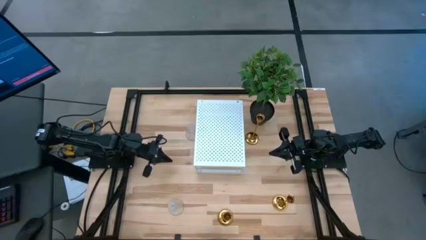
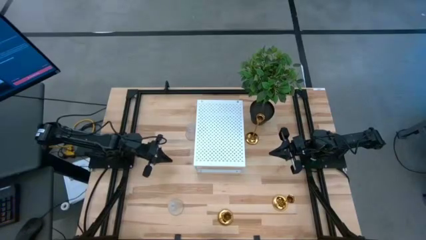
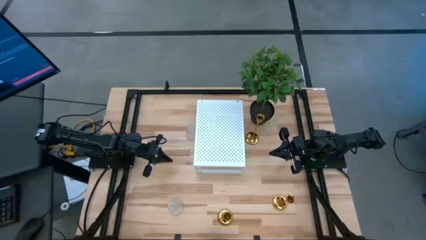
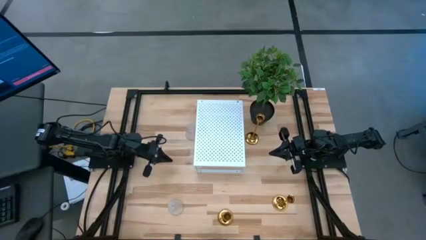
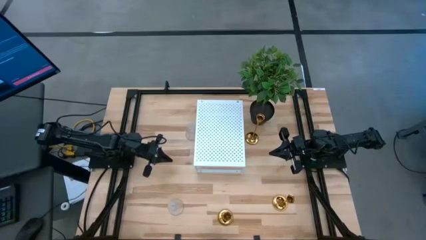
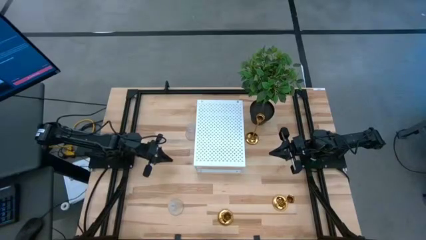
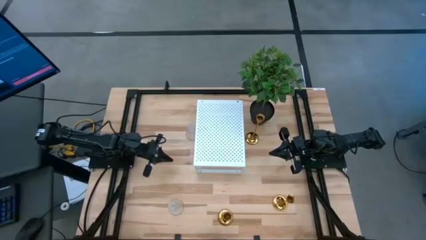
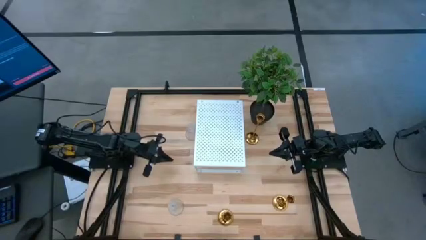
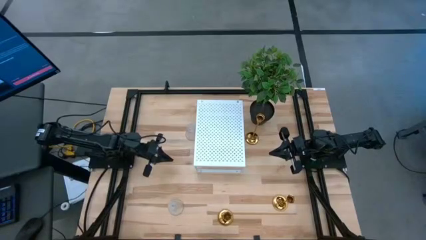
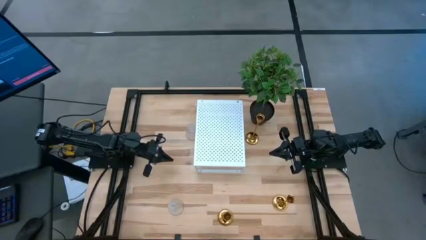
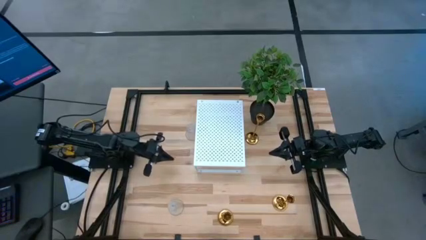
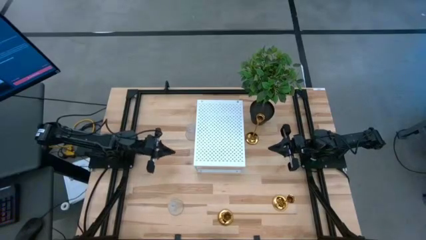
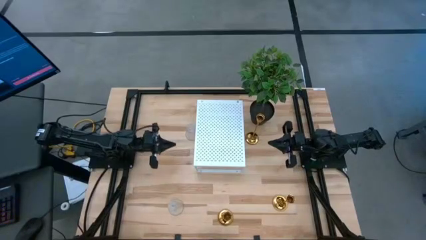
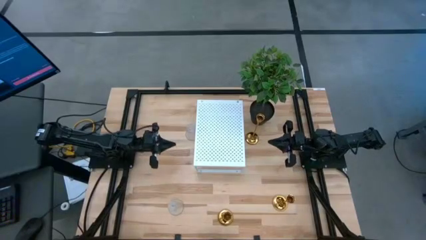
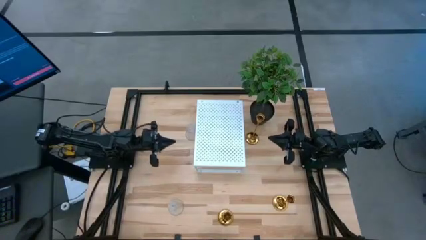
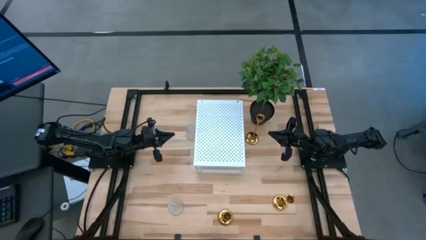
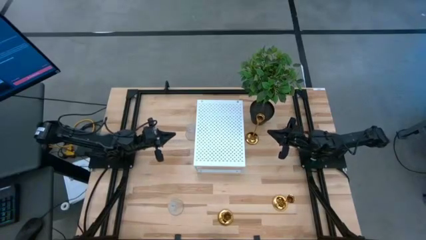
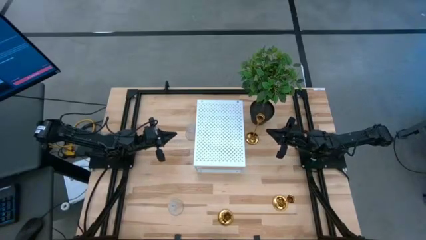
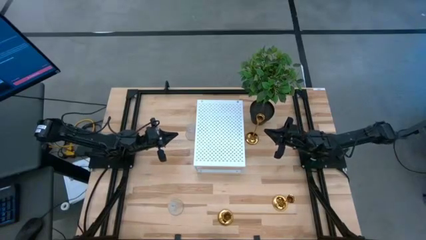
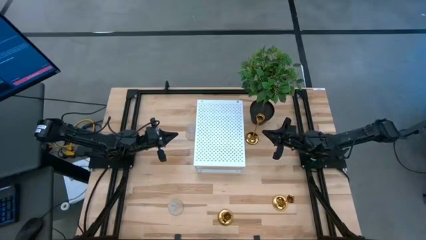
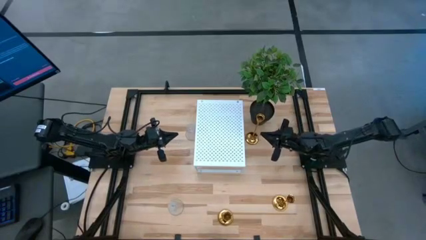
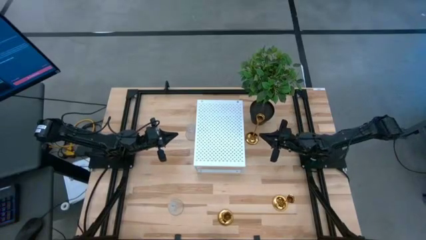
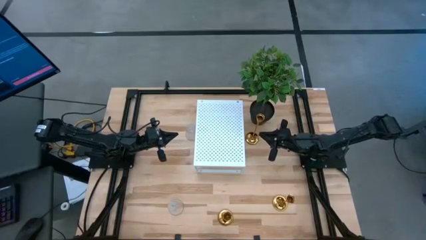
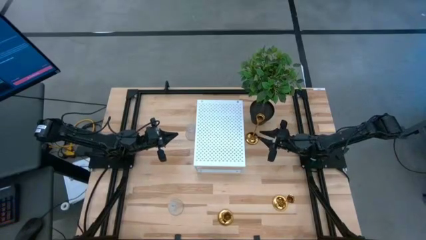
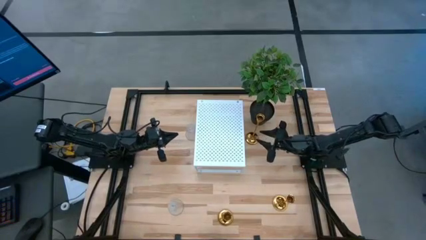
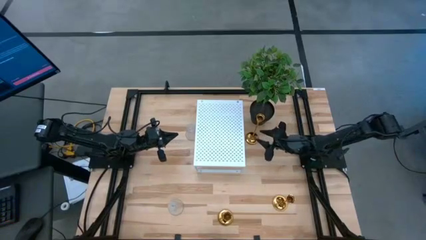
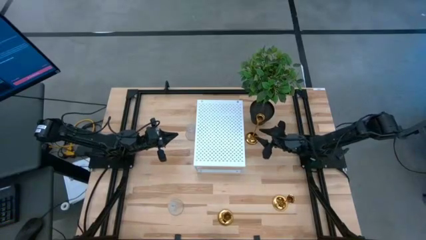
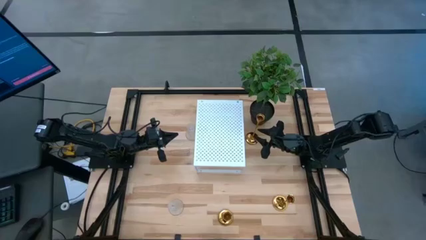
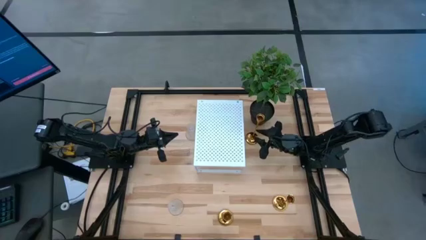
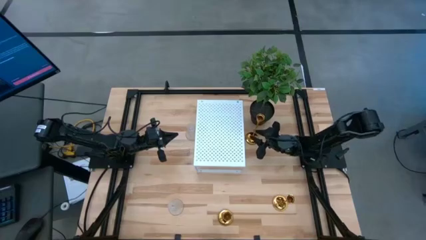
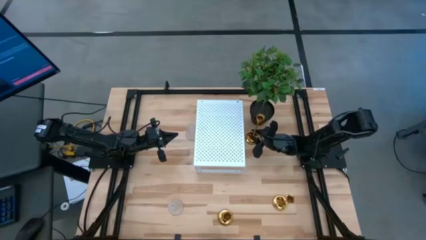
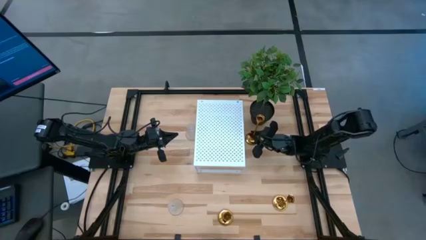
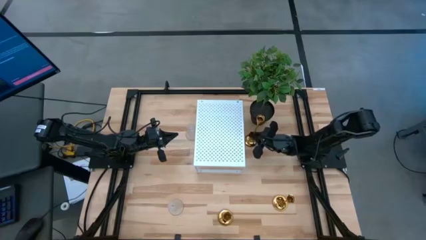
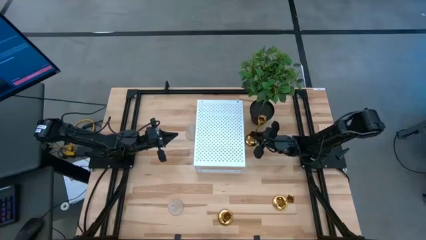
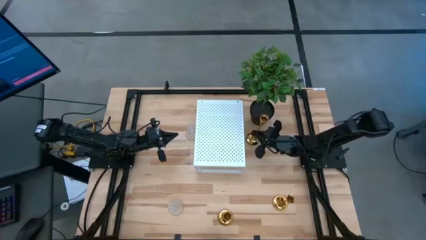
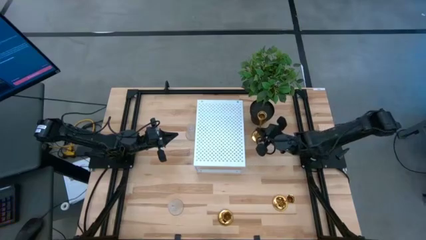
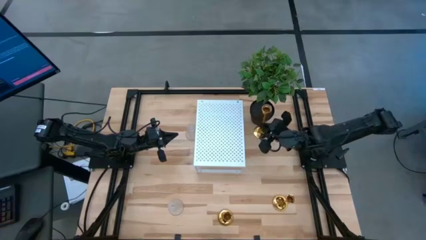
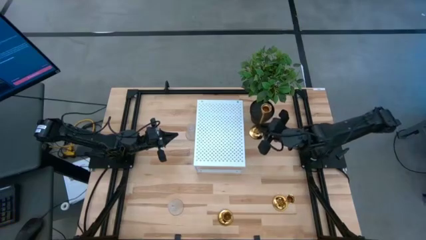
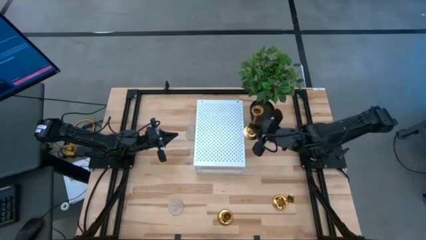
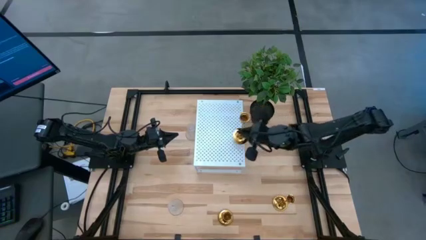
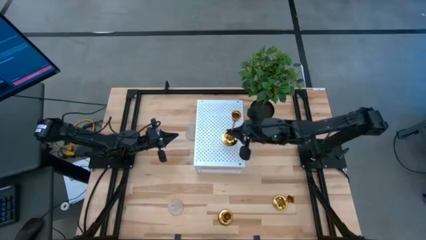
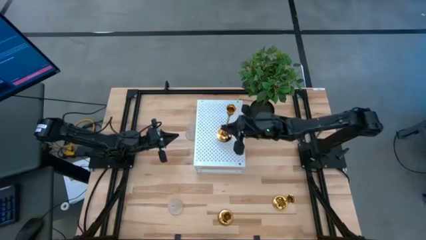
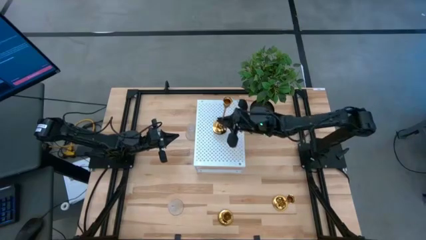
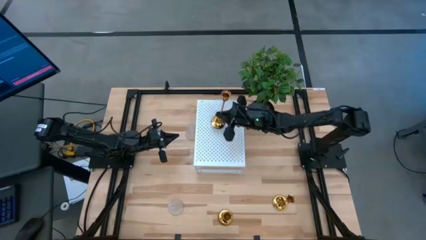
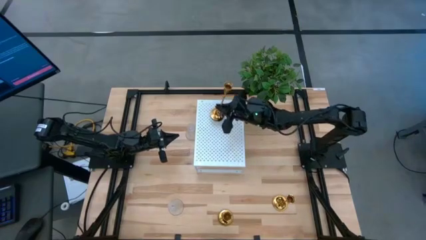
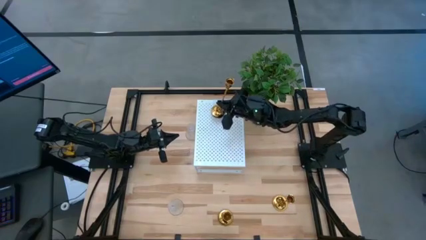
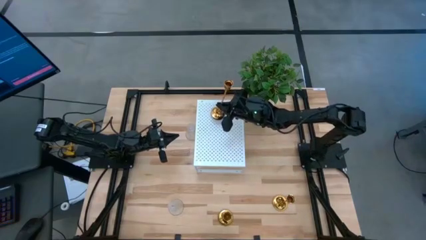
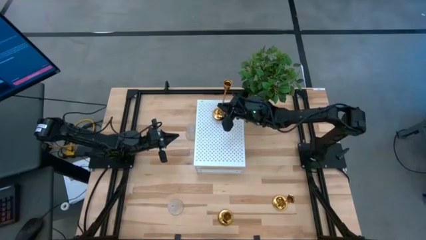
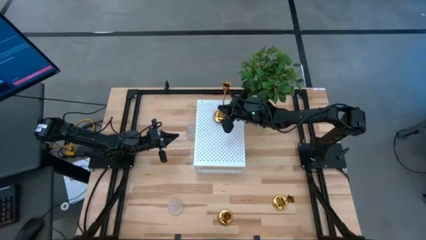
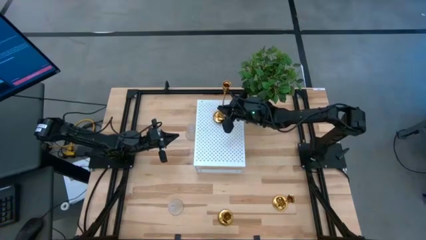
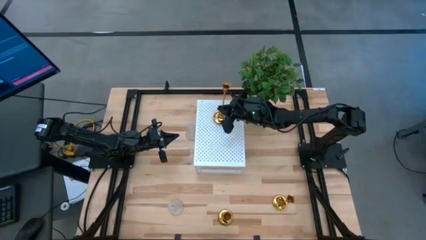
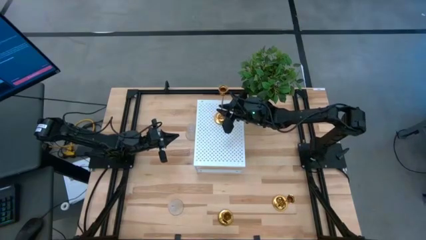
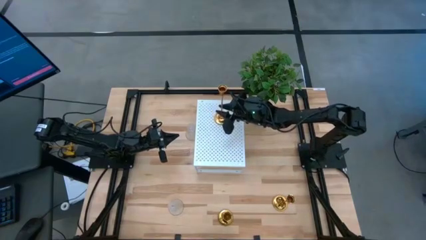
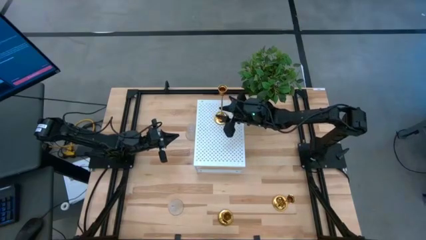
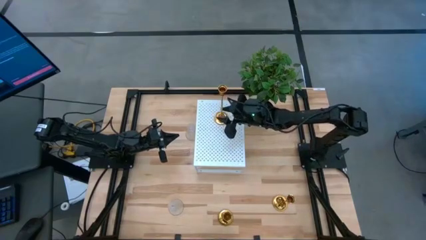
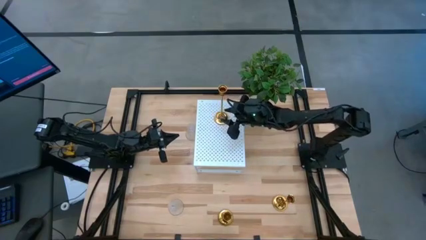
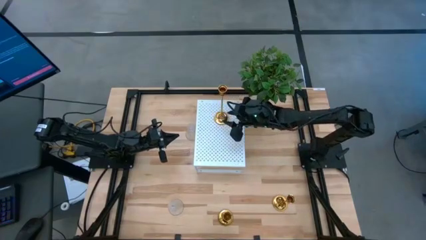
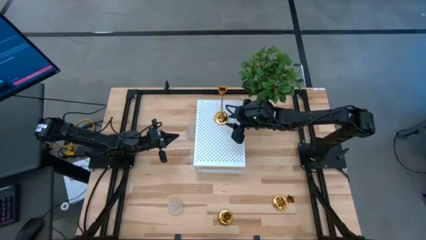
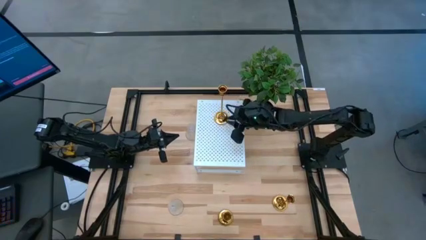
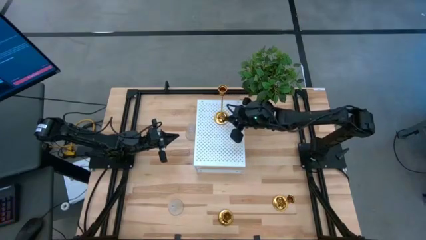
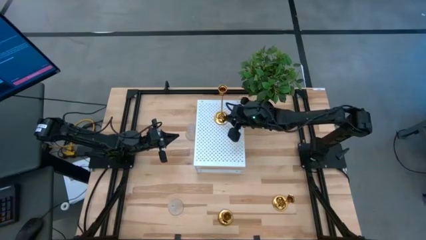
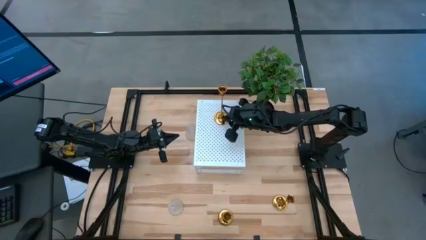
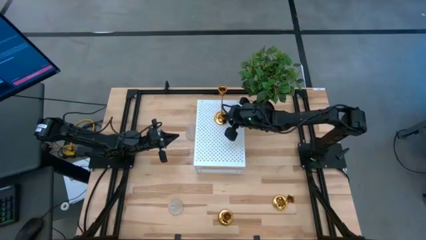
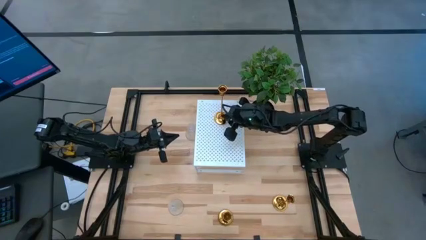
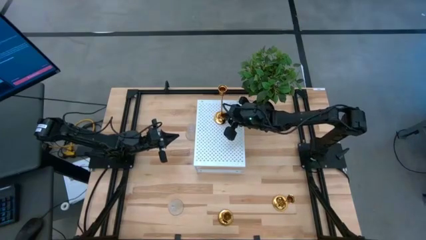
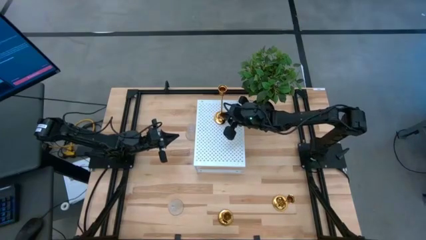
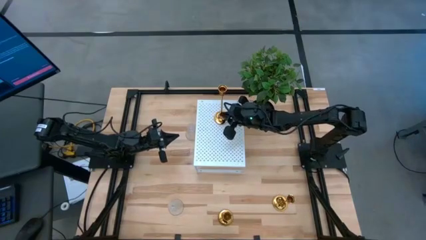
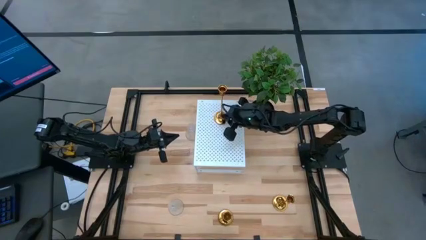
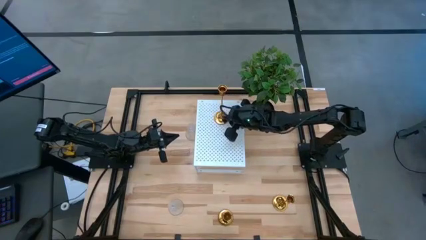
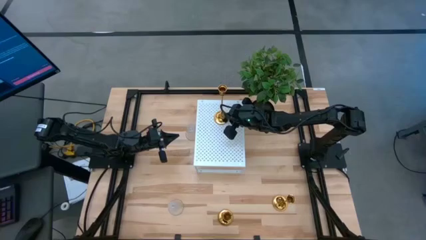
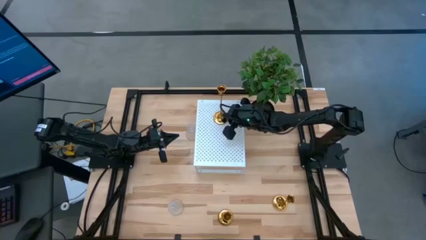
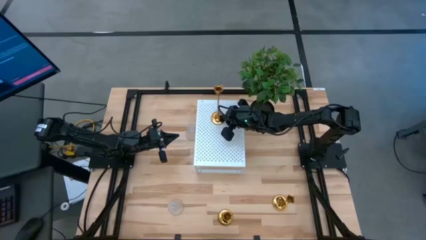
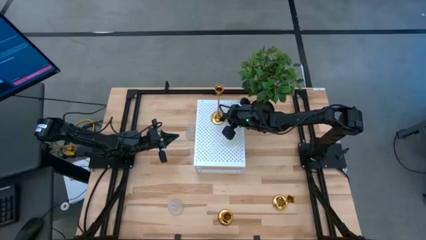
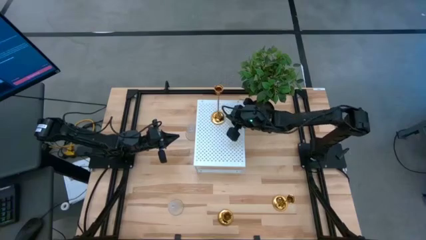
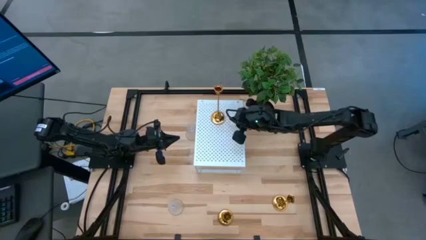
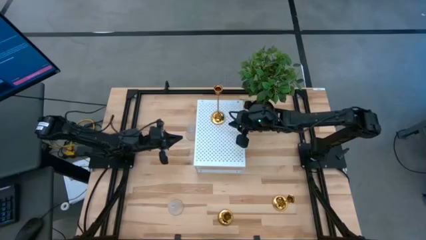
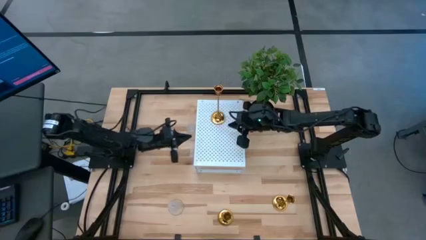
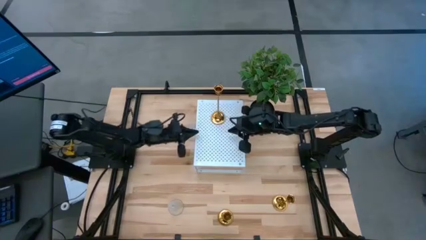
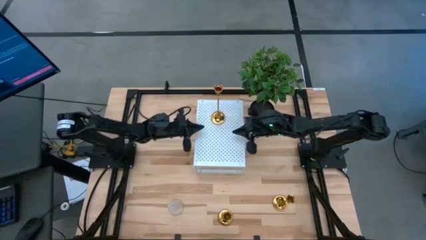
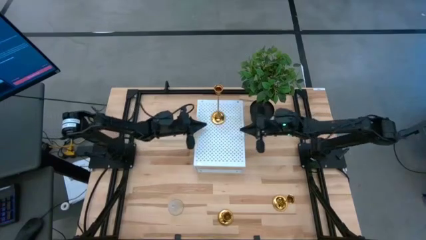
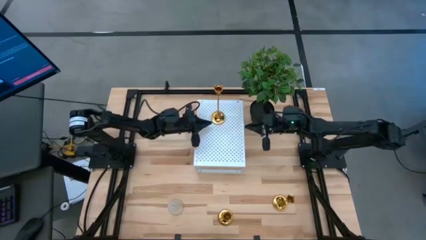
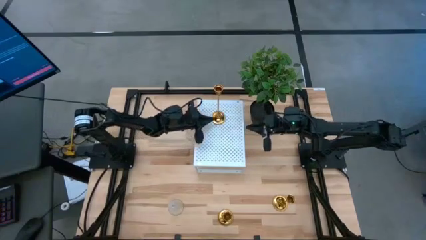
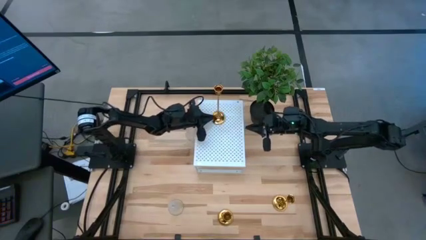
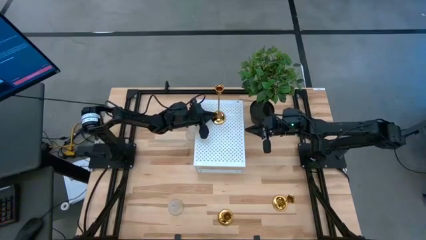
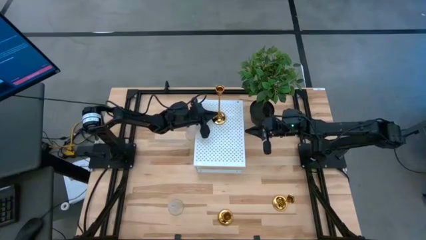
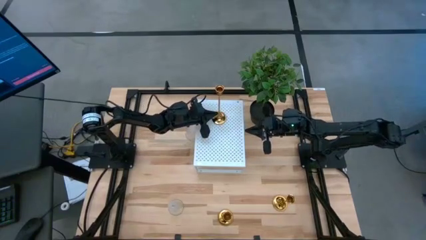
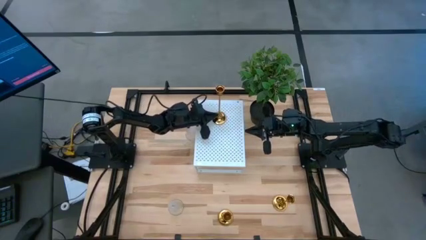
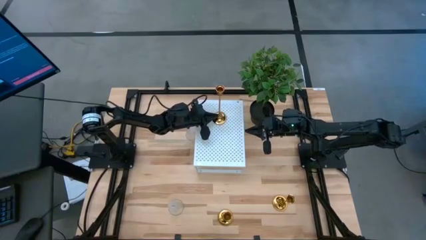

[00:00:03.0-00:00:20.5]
Task: Pick & Place candle stick holders
Put the top golden candle holder on the shelf
